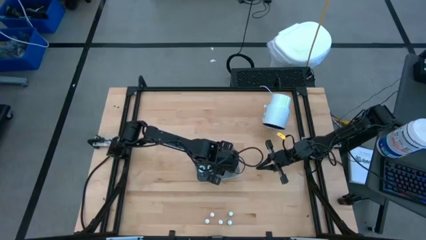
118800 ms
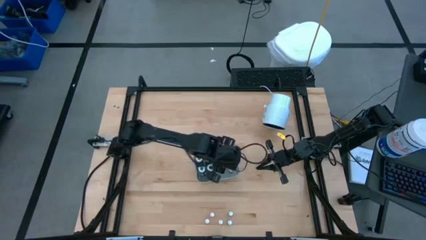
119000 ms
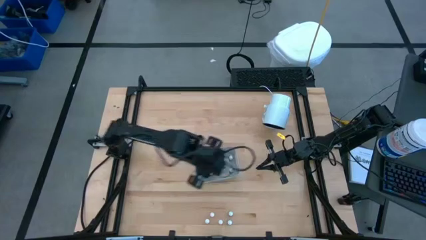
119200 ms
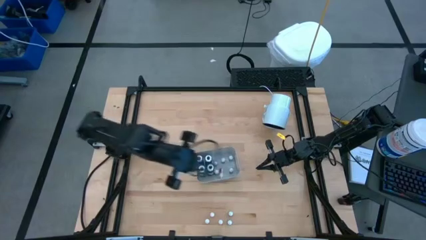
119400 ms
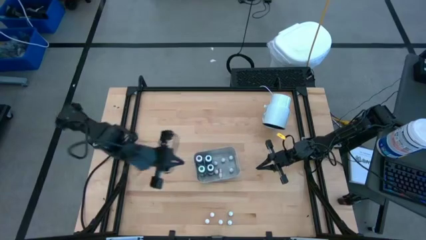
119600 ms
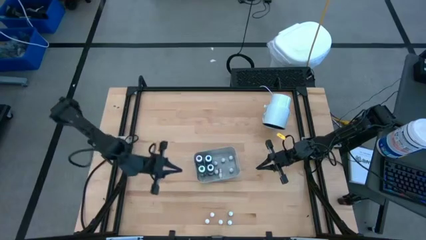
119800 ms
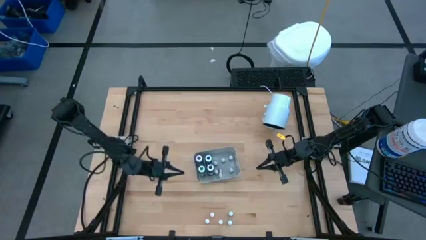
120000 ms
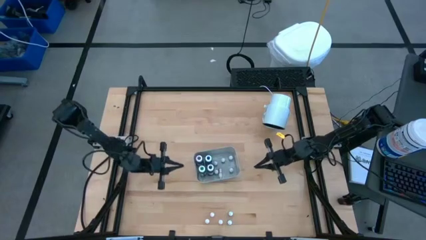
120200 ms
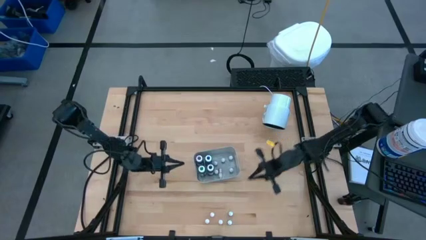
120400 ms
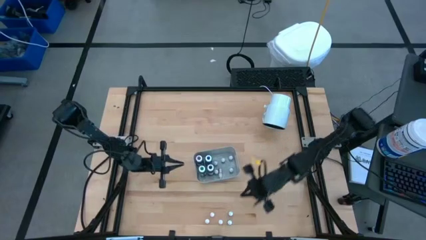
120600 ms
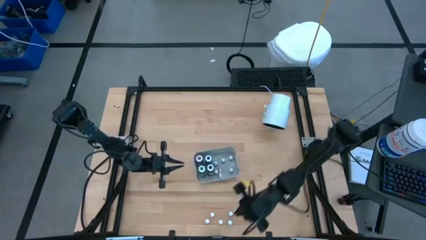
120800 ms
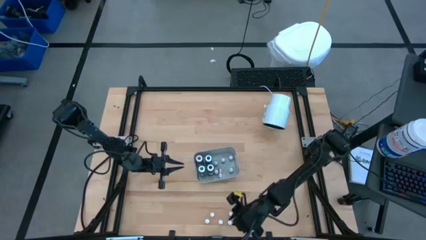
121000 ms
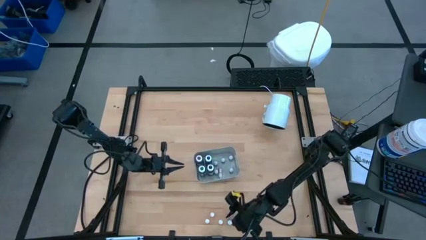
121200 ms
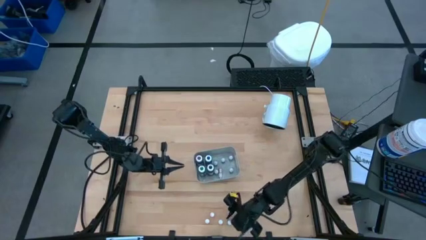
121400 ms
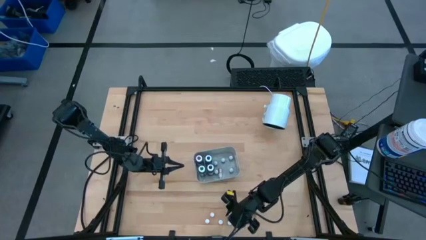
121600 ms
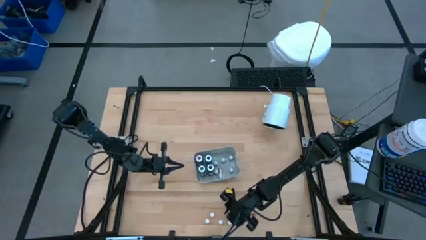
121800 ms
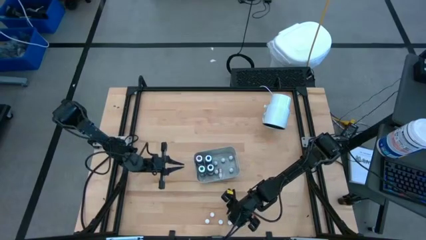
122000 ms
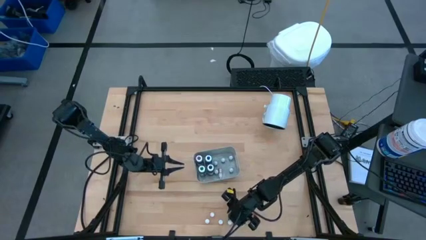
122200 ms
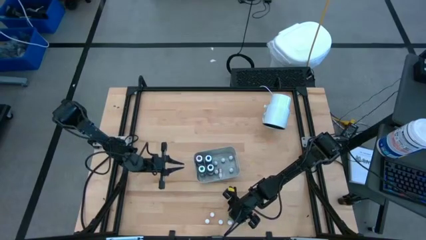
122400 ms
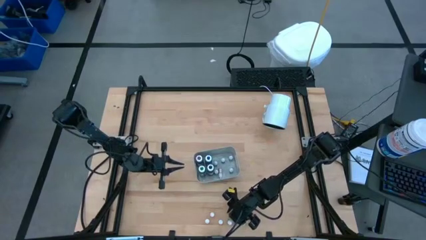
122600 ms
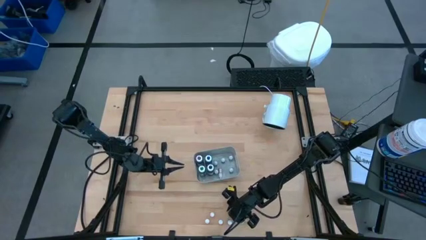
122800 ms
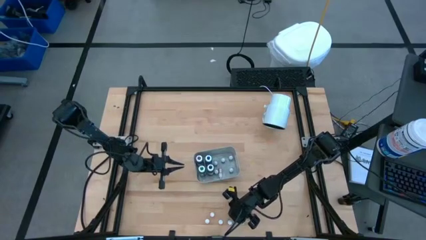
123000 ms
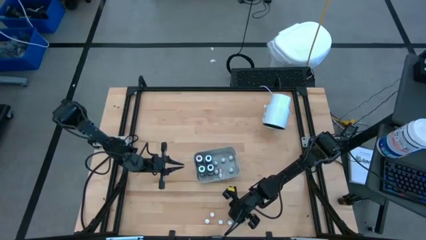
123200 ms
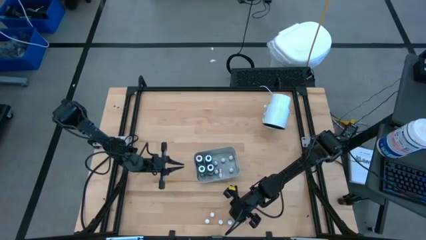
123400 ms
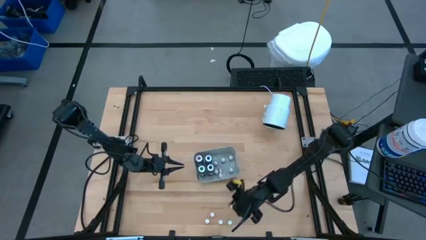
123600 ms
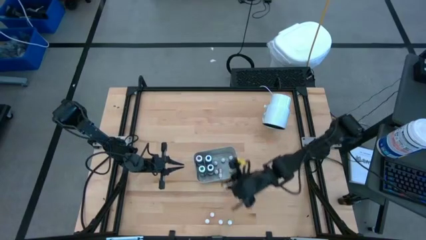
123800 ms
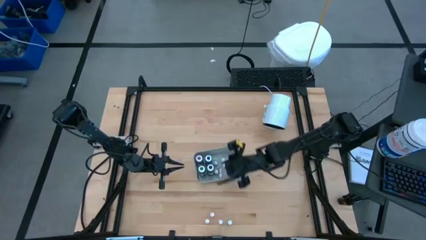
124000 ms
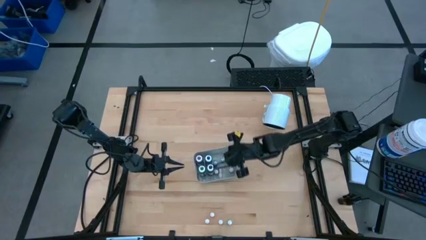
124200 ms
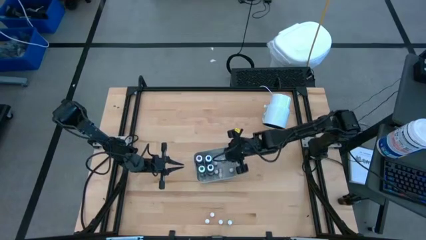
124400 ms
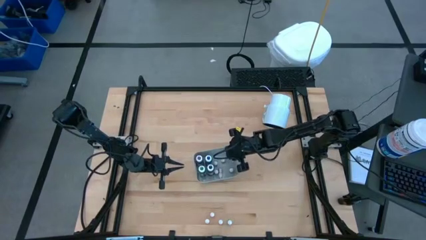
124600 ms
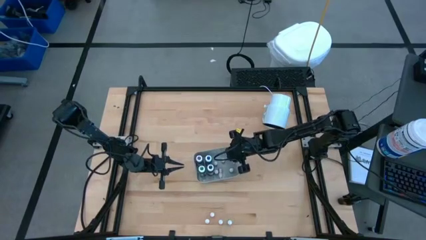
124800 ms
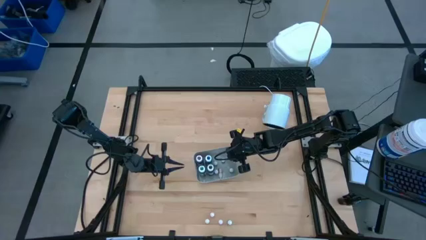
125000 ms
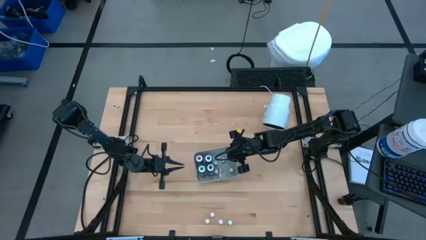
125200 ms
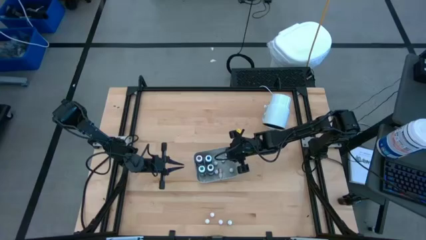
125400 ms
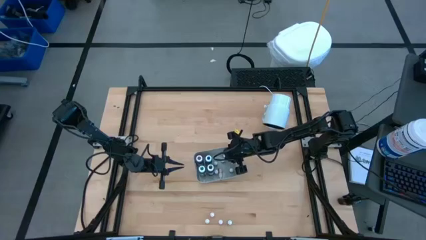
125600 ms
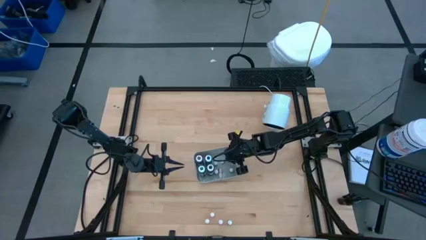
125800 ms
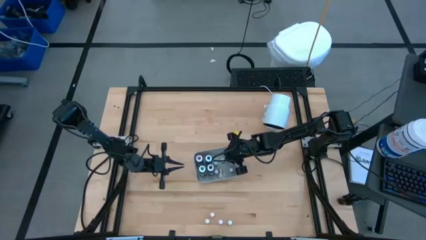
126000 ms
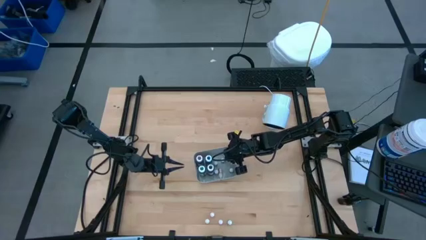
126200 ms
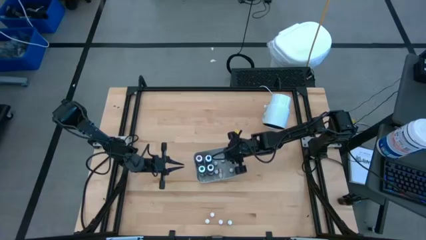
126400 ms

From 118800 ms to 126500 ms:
Task: Pick & Place food coloring
Put the small blue food coloring bottle into the gray bin

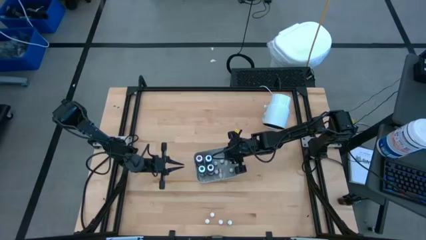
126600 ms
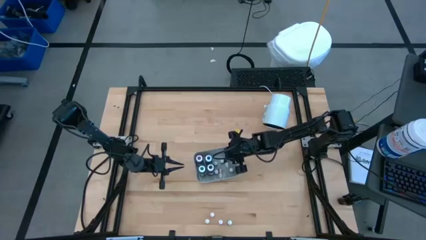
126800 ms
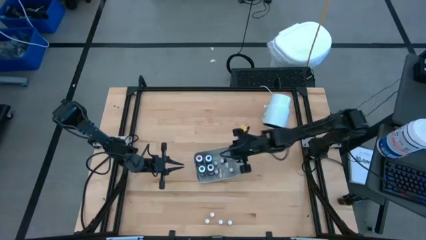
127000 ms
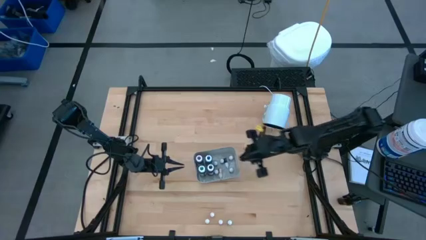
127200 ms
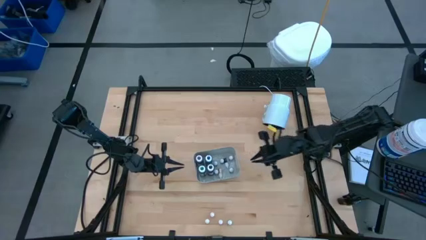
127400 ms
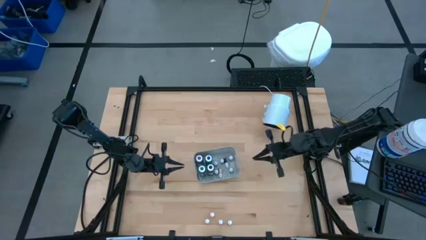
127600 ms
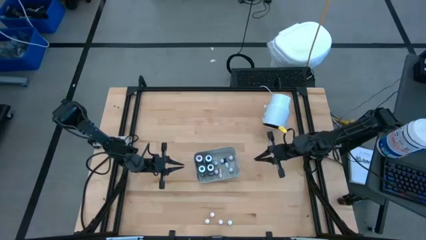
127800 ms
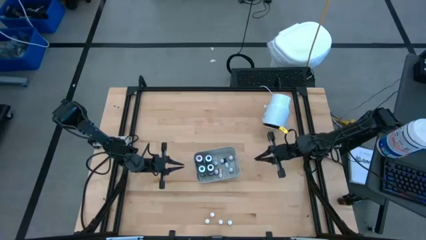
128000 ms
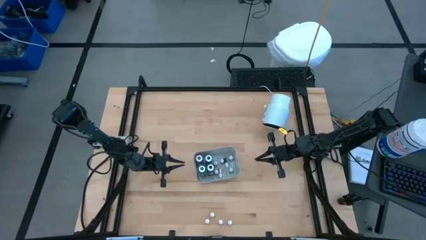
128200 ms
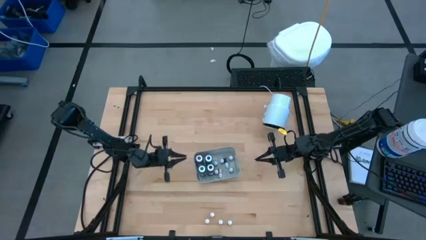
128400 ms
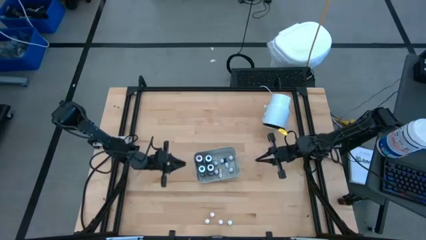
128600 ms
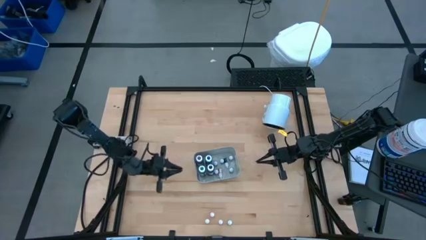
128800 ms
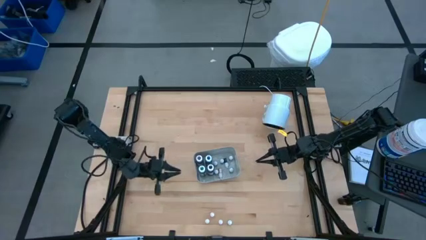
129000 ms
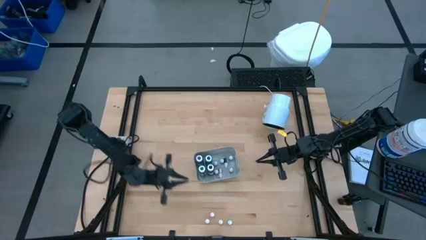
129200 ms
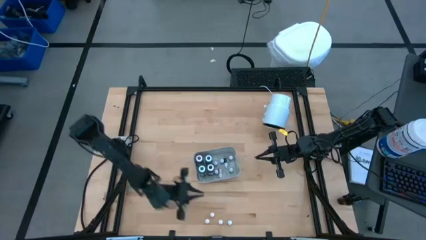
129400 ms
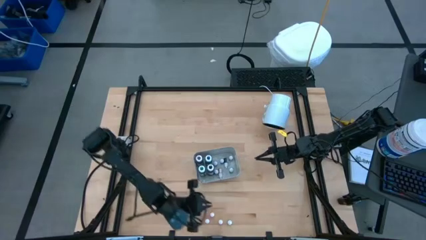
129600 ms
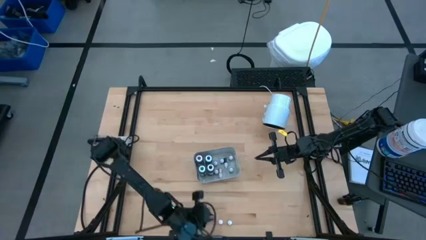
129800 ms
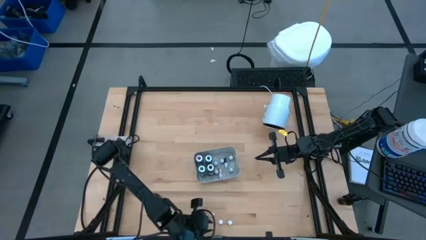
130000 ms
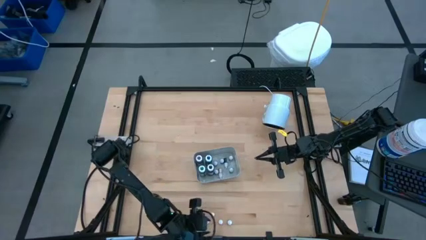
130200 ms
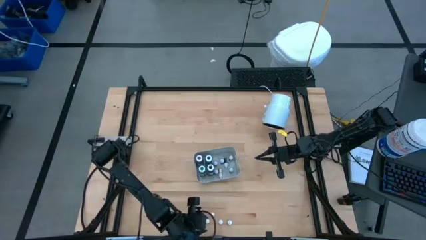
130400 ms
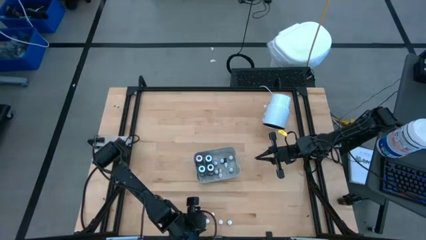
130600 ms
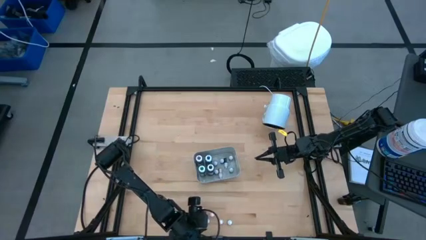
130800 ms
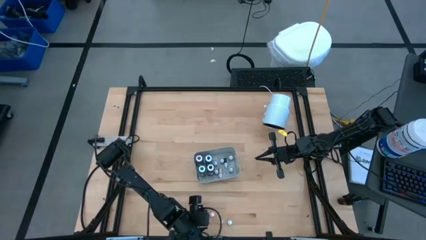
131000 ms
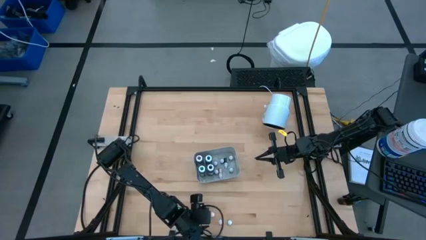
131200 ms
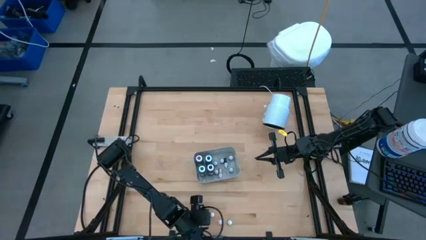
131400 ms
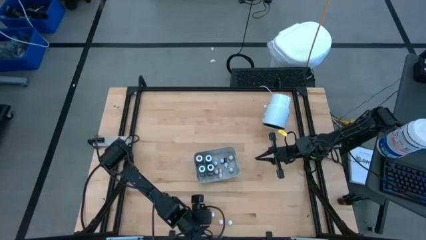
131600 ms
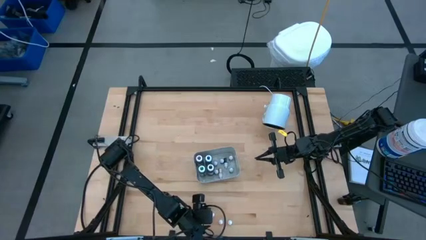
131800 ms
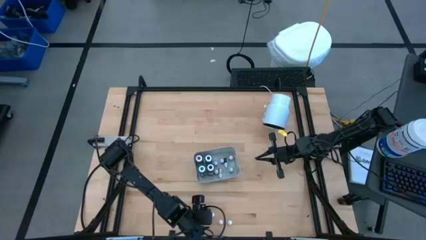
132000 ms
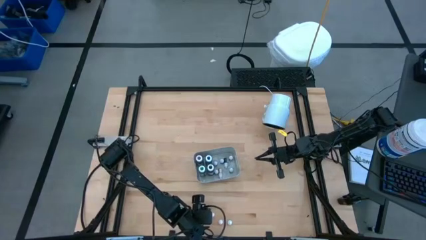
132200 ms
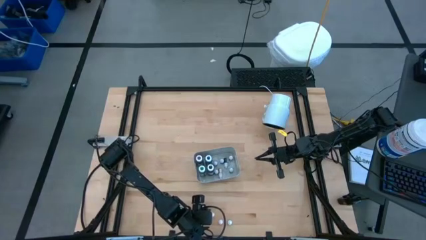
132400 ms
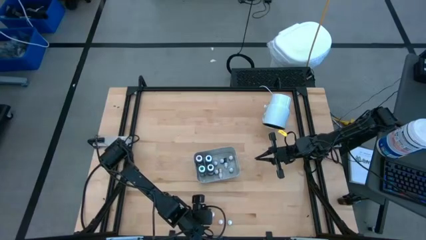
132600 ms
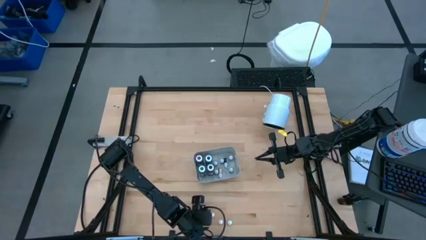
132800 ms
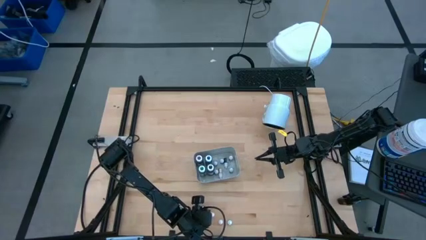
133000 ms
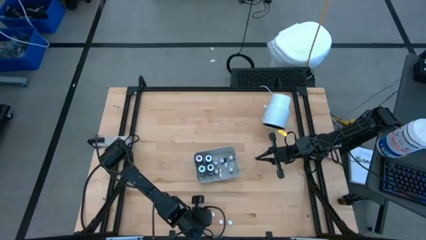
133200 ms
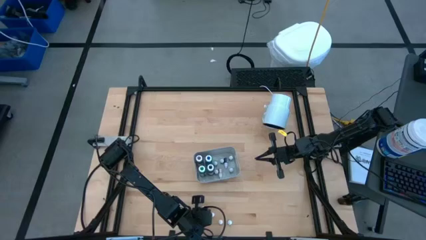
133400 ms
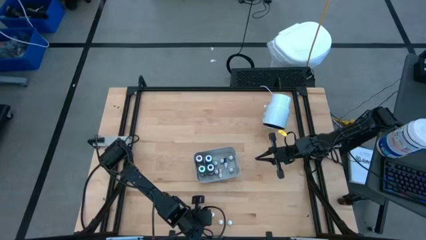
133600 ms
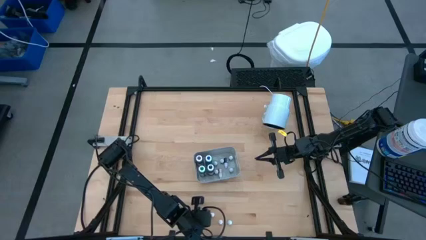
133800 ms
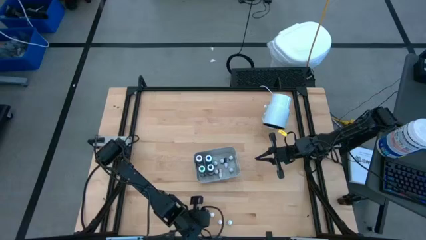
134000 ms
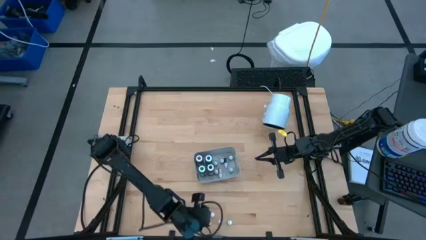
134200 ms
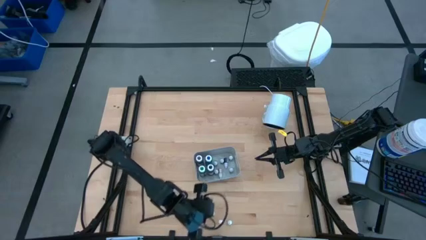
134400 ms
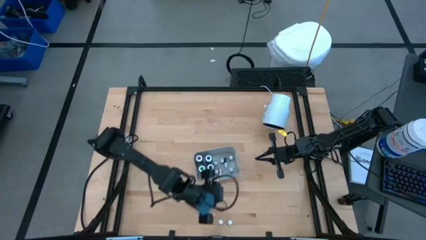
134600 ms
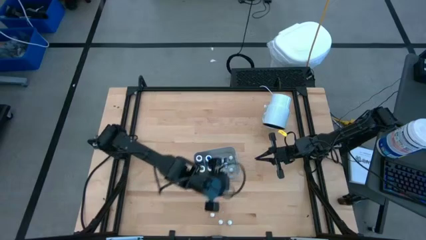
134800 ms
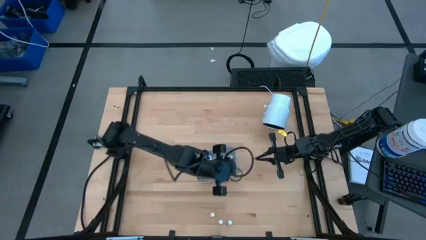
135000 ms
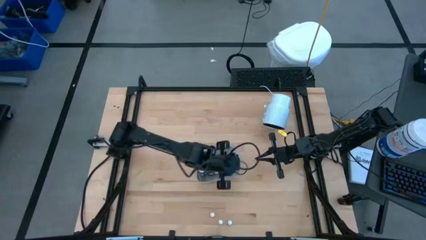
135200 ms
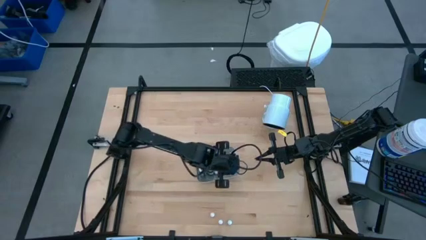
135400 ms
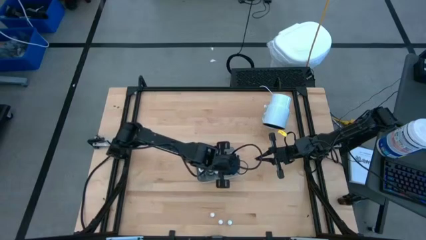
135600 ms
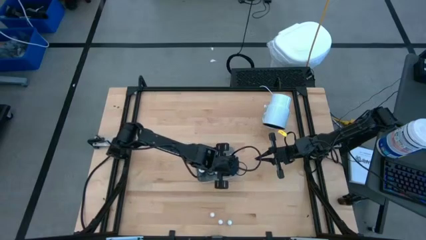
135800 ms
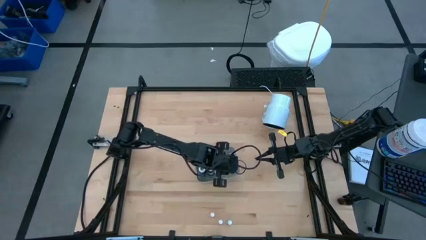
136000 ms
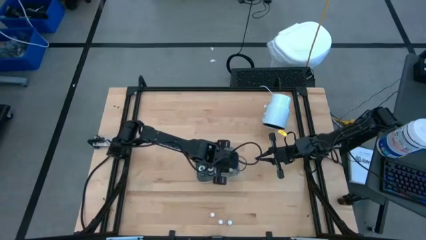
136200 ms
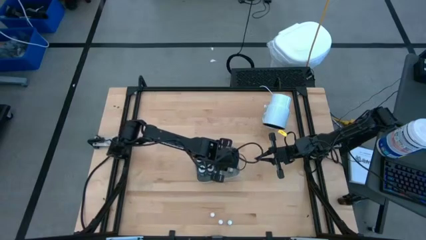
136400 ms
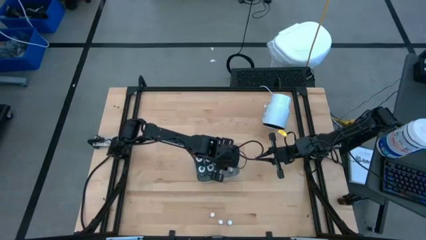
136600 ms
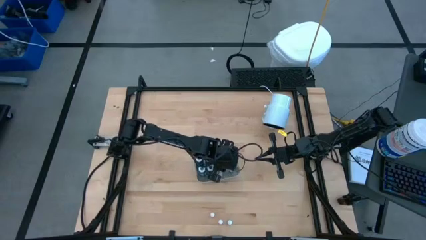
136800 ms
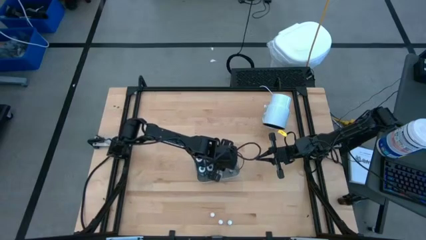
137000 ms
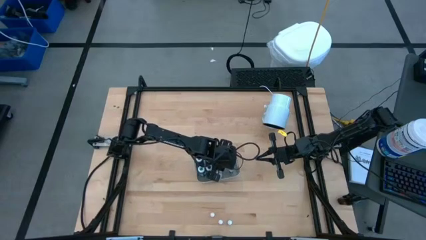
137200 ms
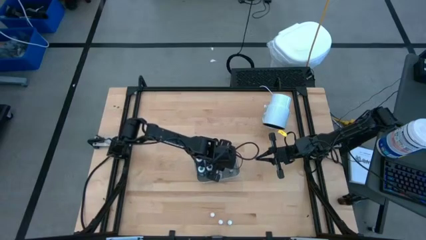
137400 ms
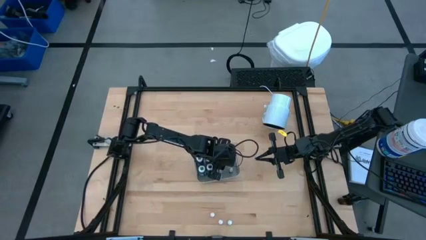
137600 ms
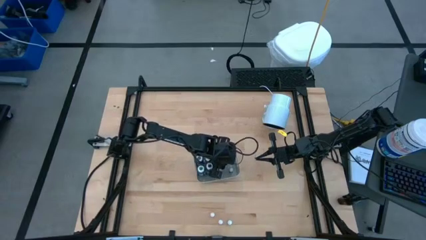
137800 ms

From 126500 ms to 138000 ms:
Put the small orange food coloring bottle into the gray bin
